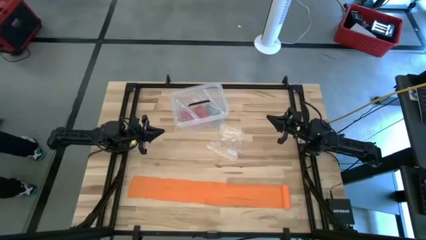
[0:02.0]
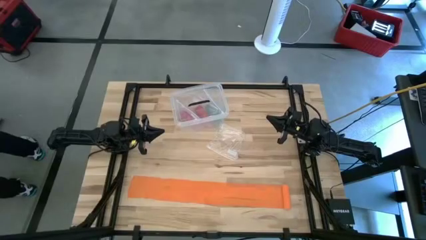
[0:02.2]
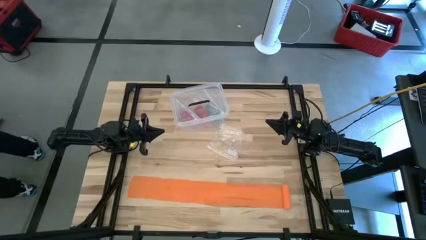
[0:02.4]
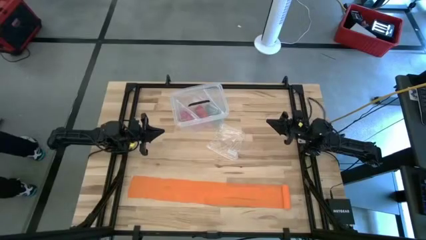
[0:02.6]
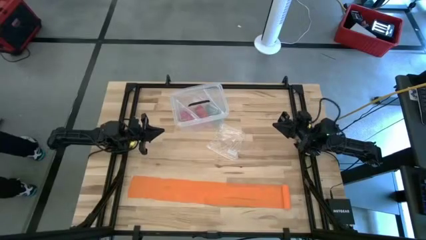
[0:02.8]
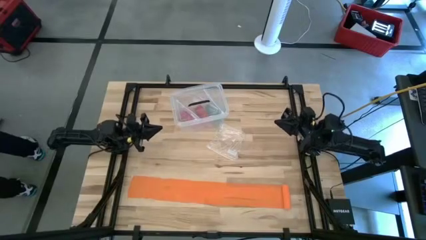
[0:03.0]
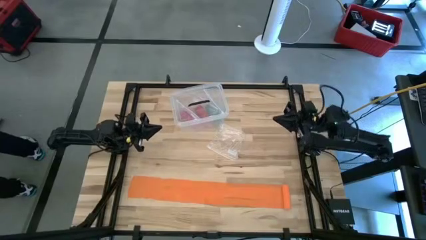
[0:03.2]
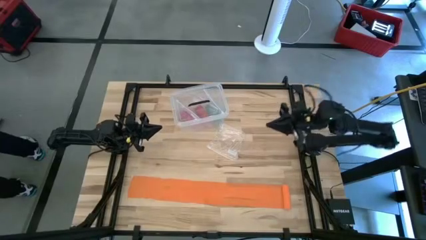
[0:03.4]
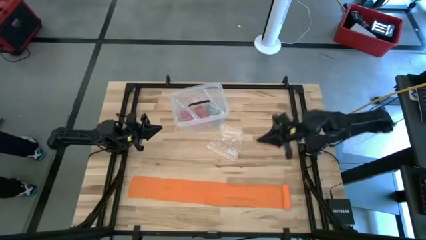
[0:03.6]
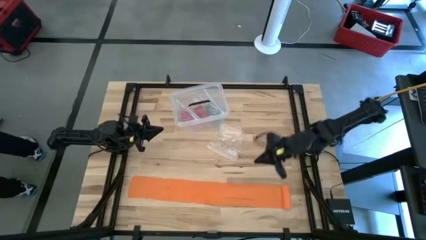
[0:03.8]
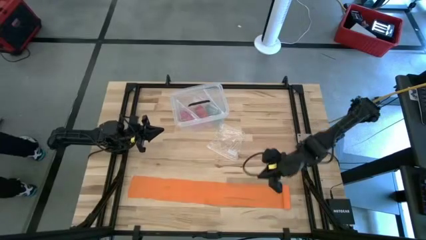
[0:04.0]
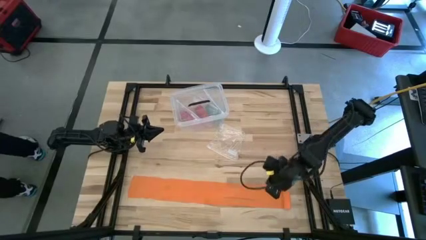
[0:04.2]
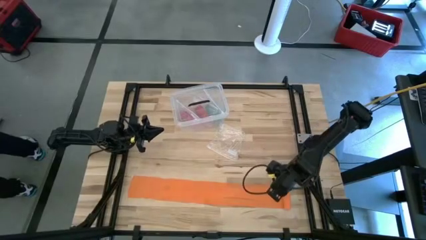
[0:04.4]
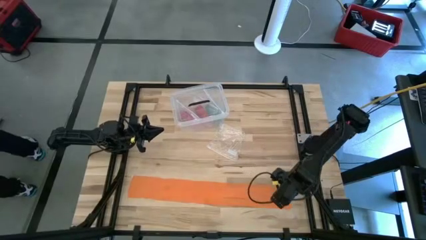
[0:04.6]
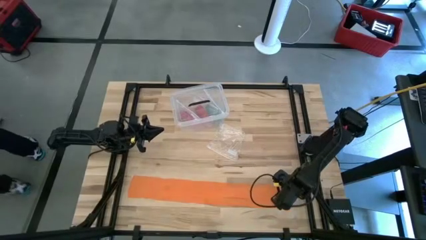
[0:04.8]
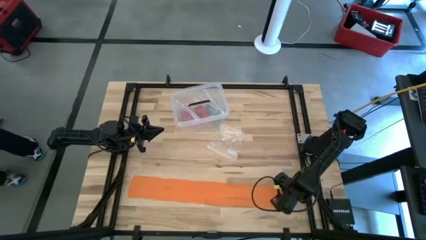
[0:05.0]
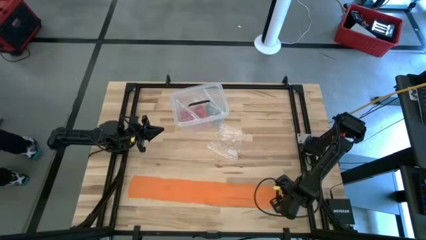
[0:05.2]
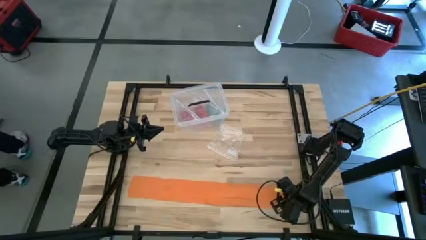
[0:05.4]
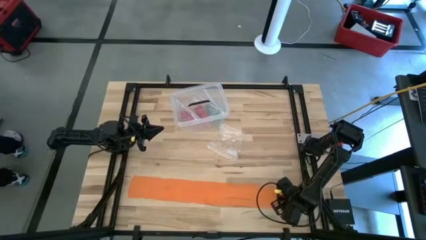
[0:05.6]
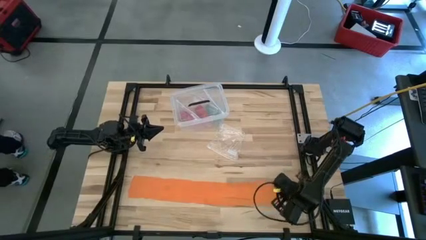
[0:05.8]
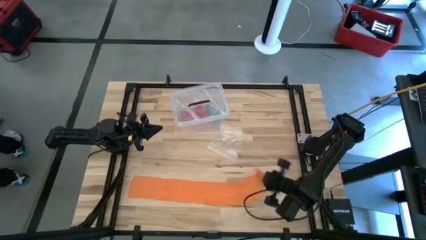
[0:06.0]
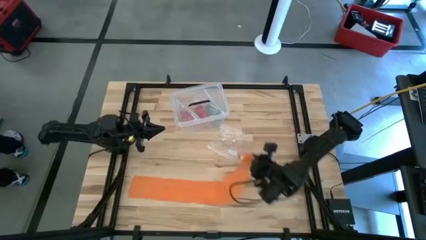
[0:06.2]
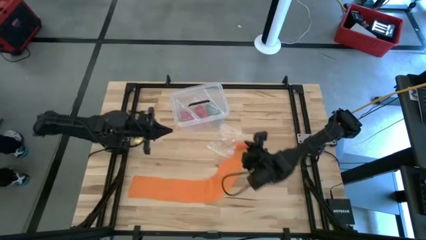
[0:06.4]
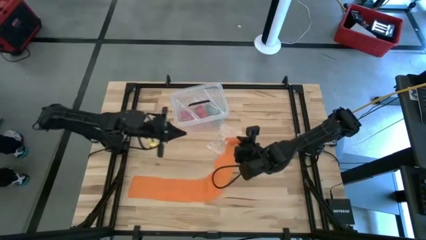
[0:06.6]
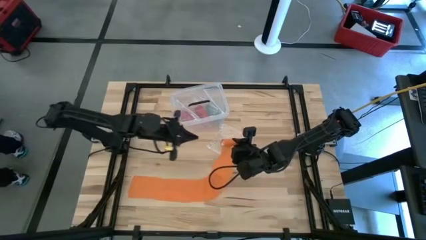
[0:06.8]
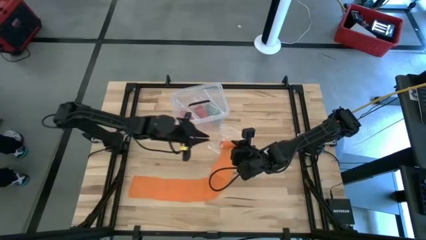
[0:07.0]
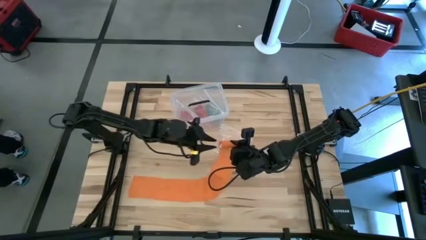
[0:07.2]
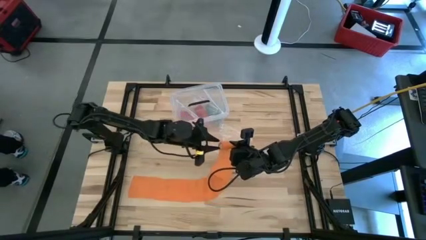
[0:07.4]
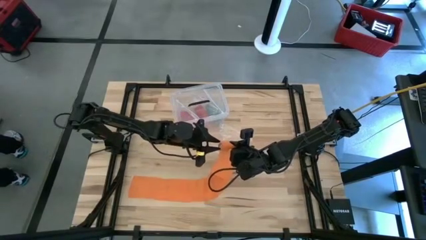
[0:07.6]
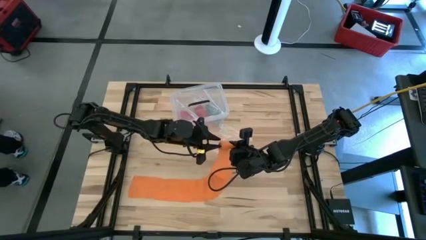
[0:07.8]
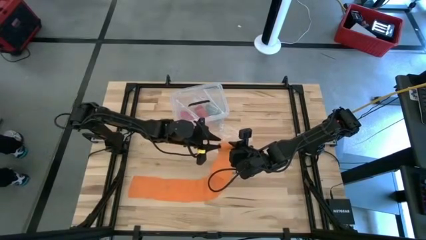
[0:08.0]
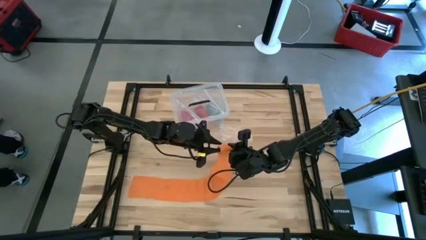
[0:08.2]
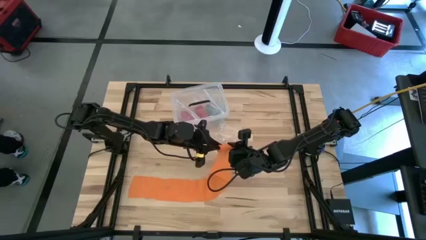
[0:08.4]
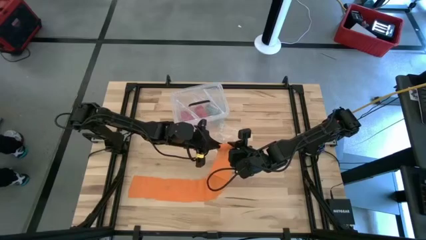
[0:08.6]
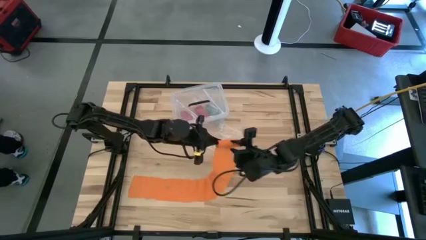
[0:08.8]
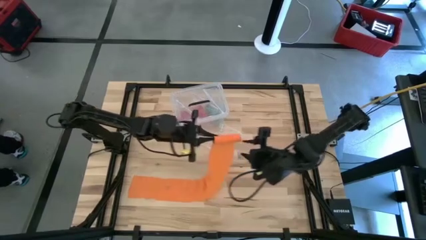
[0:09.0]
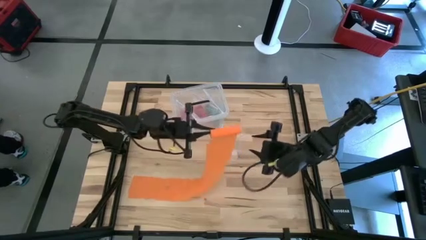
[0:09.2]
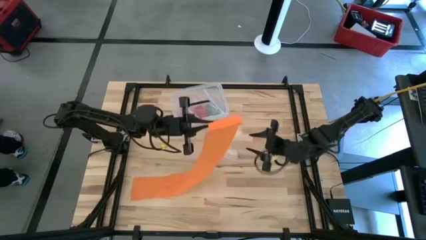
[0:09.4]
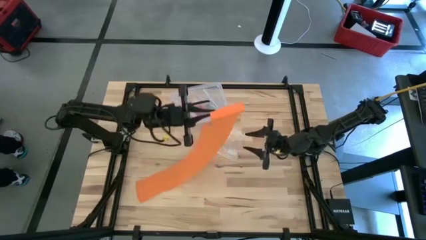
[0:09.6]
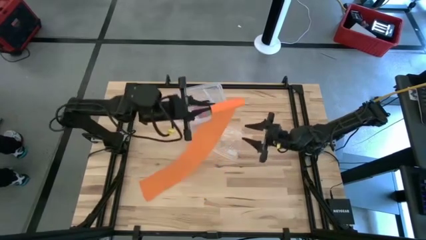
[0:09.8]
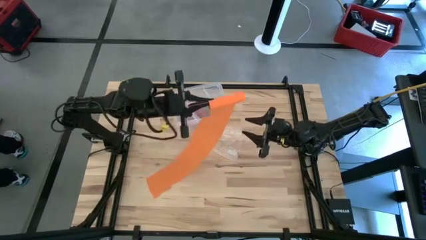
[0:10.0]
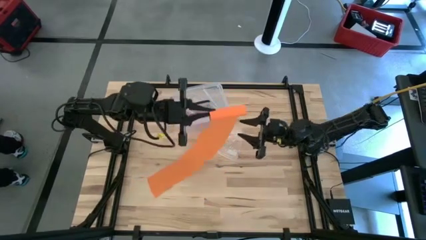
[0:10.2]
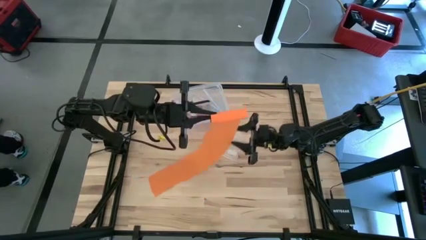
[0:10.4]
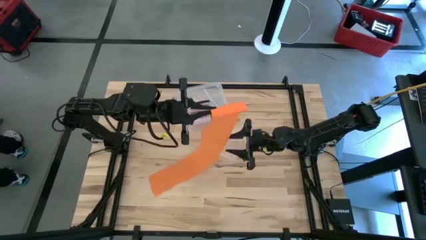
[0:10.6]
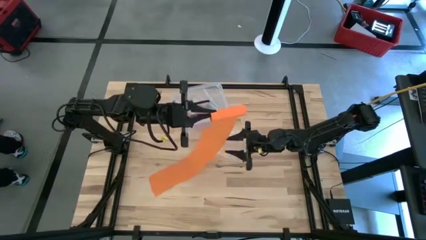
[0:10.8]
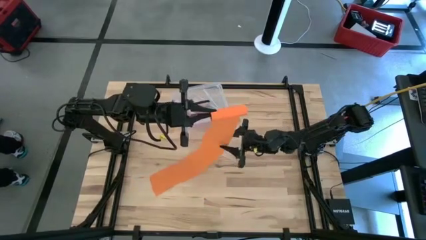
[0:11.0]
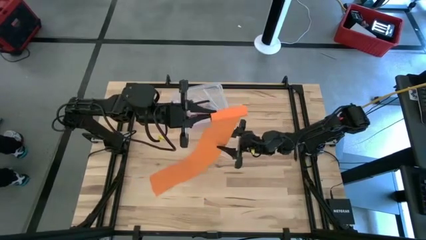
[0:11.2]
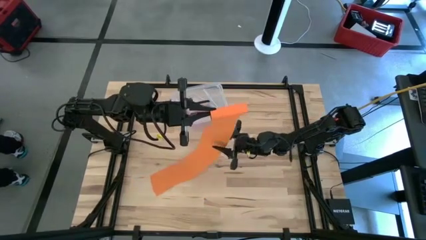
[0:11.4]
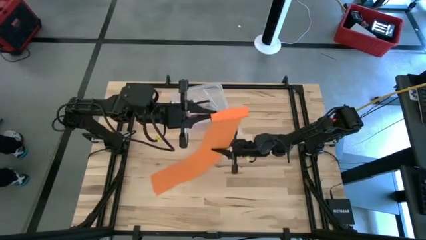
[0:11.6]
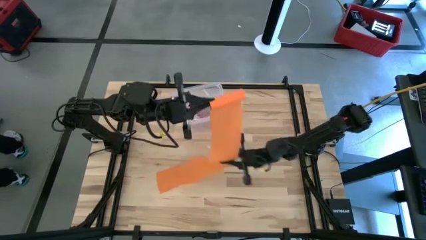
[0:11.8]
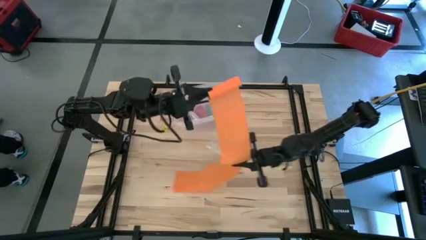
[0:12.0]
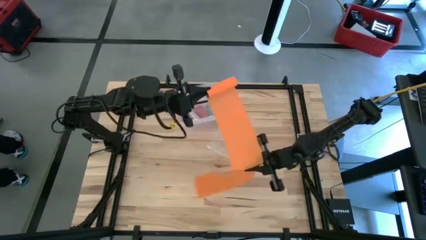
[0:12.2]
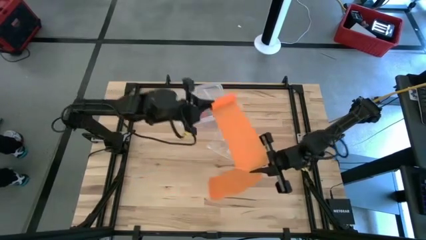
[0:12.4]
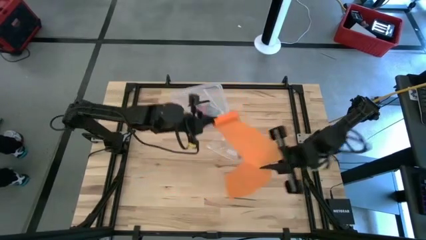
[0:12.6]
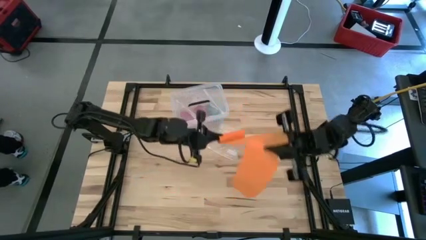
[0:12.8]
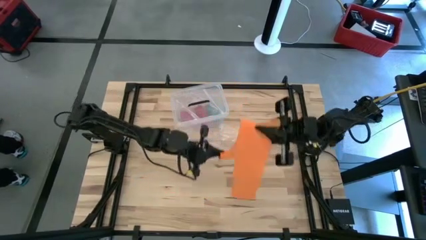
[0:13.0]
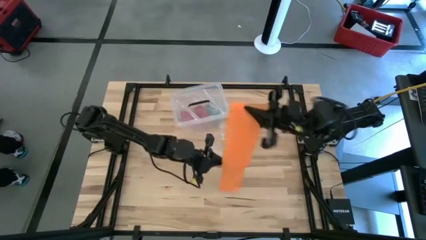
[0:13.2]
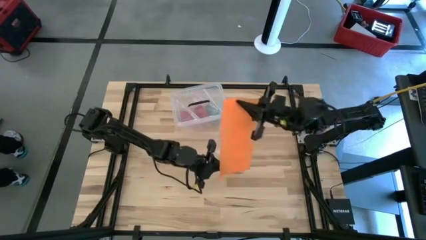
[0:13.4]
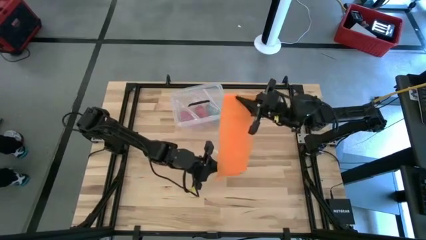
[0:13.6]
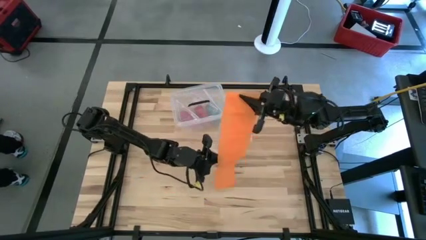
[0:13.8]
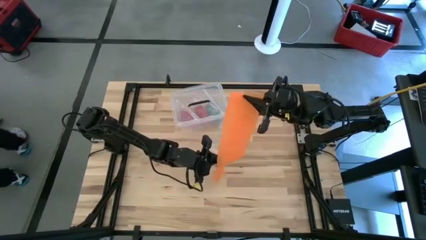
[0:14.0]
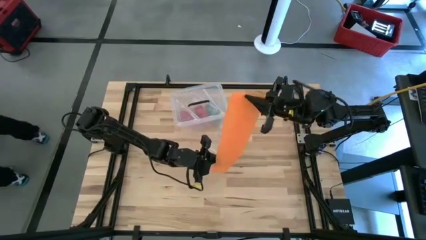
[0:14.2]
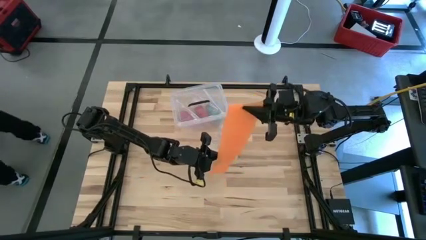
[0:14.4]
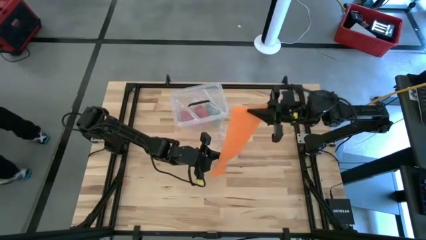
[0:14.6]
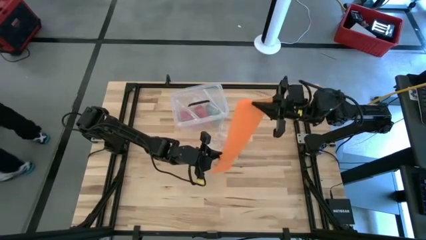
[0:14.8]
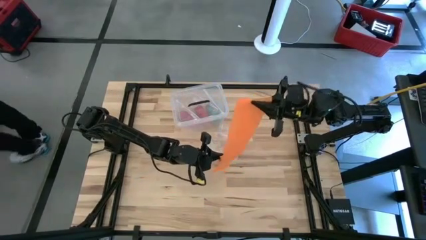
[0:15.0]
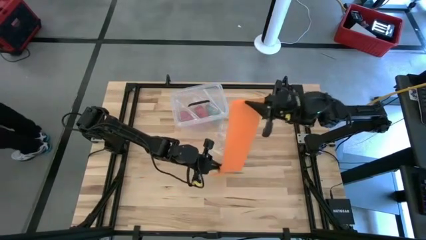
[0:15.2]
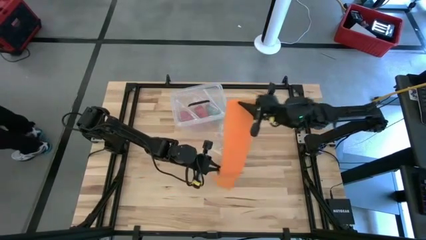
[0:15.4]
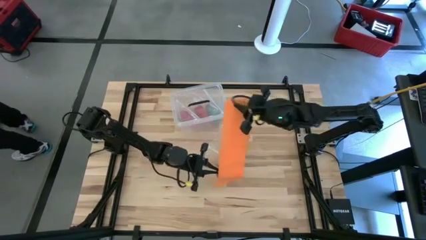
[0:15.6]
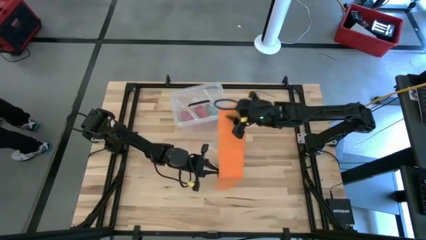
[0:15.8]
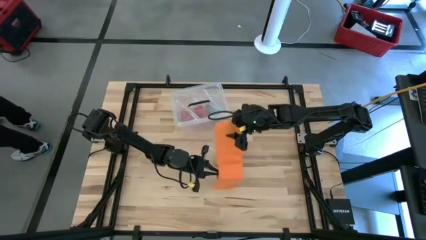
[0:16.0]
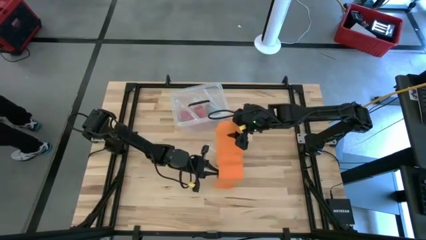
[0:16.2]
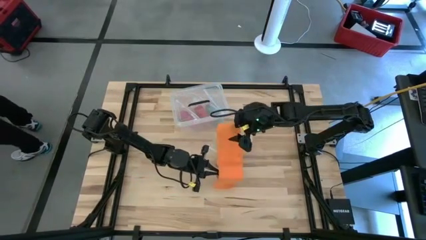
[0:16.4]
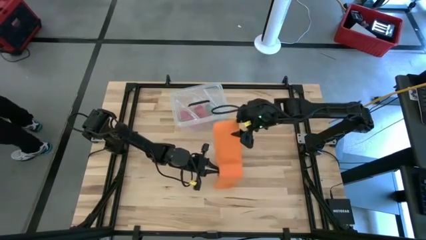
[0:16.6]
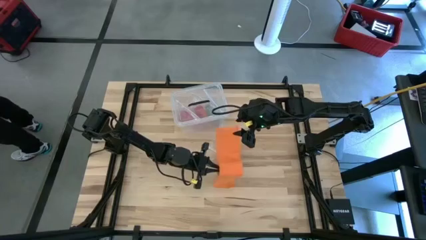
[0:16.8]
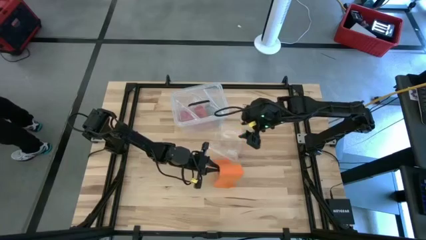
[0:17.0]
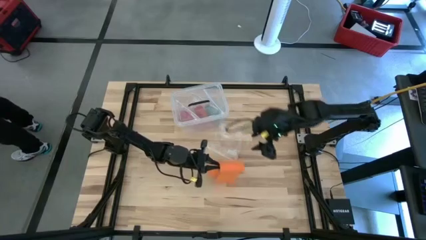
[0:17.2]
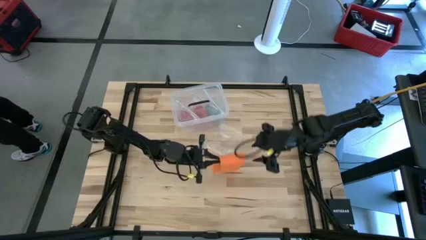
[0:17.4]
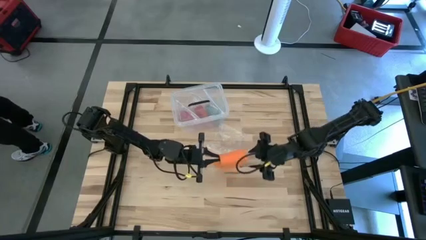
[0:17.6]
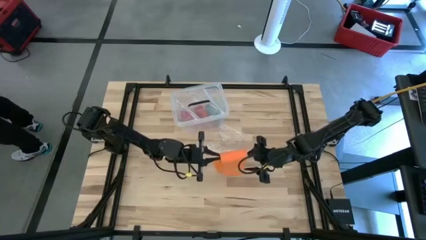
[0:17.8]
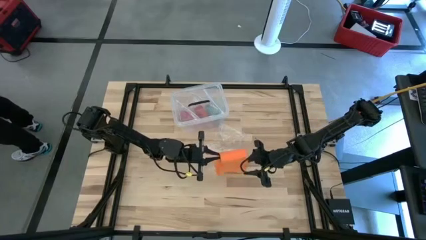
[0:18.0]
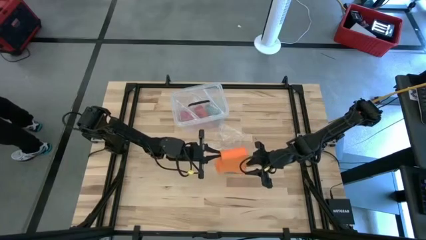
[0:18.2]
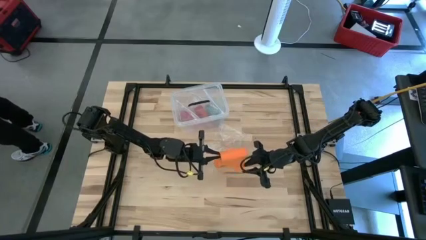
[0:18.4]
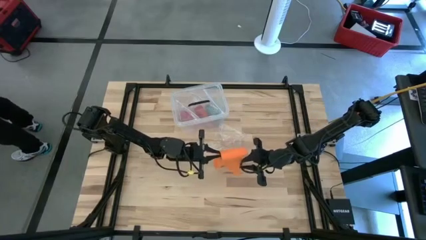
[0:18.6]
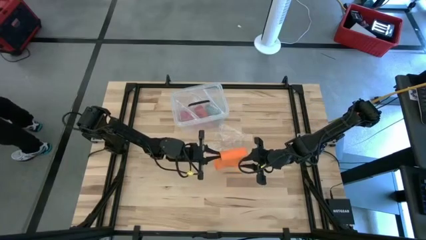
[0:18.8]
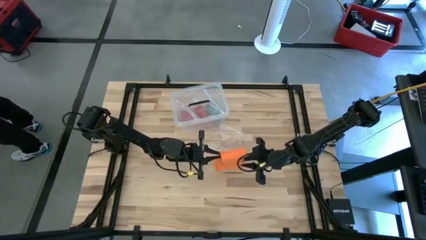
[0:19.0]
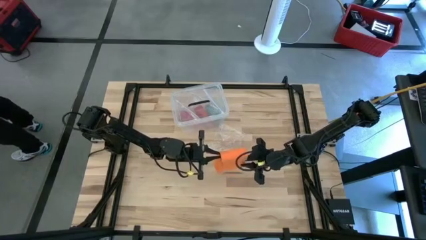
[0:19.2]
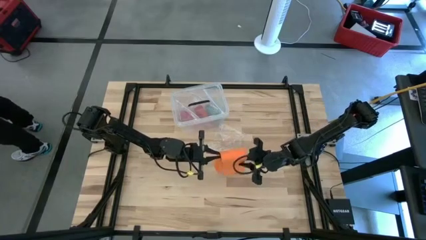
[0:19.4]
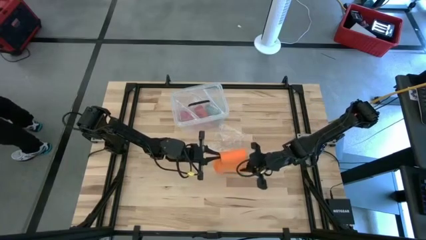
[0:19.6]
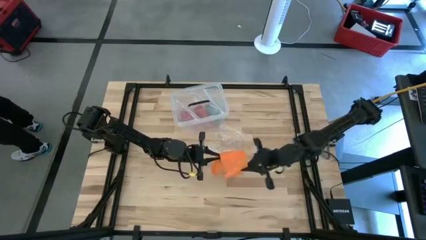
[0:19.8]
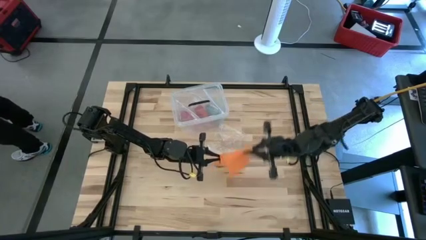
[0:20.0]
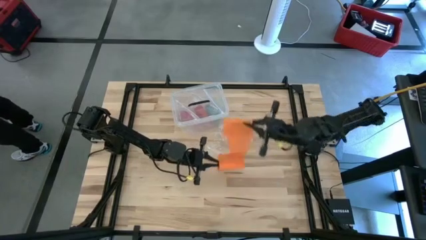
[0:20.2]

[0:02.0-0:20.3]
Task: Roll bandage
Roll the orange bandage
